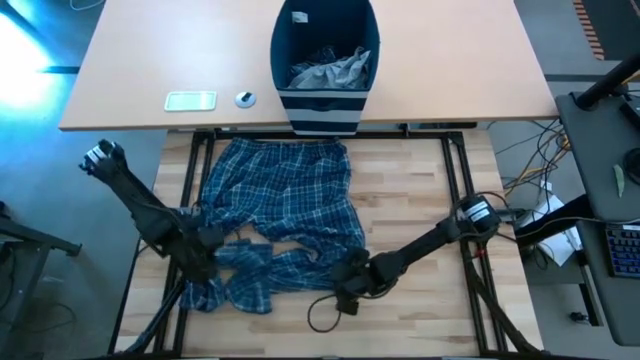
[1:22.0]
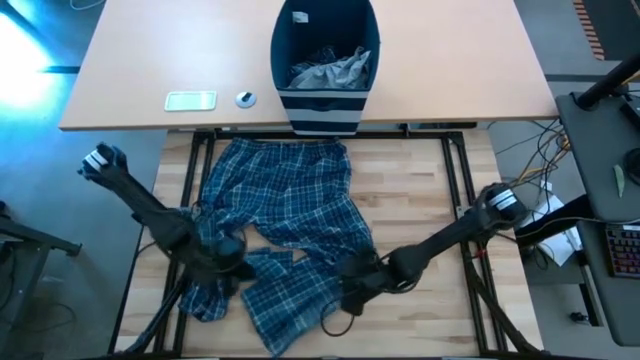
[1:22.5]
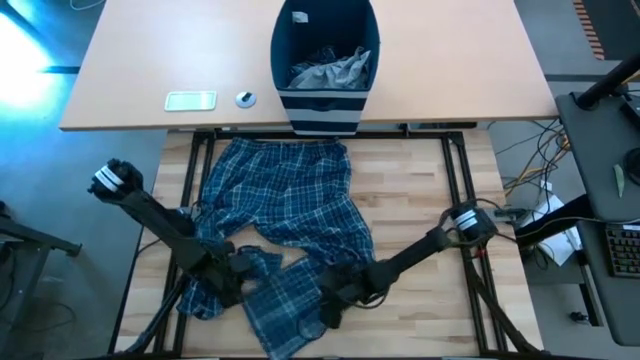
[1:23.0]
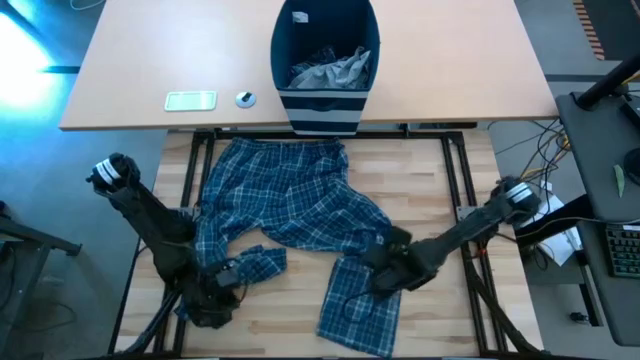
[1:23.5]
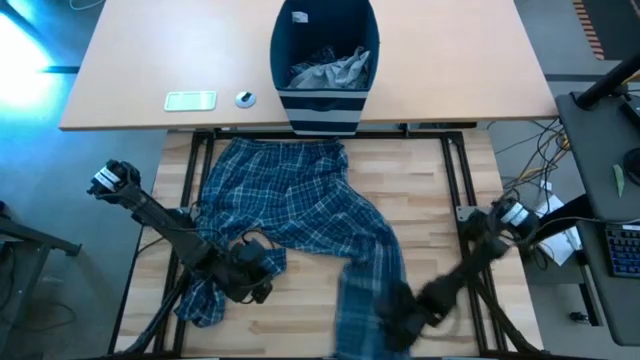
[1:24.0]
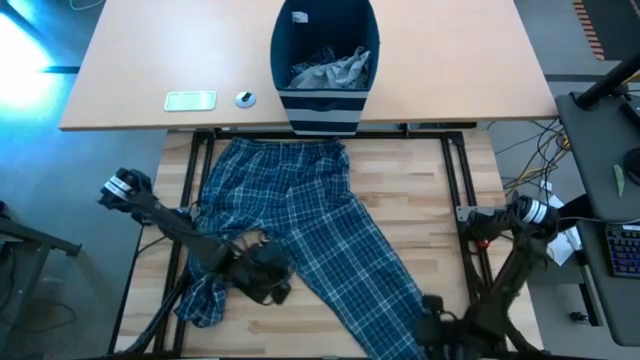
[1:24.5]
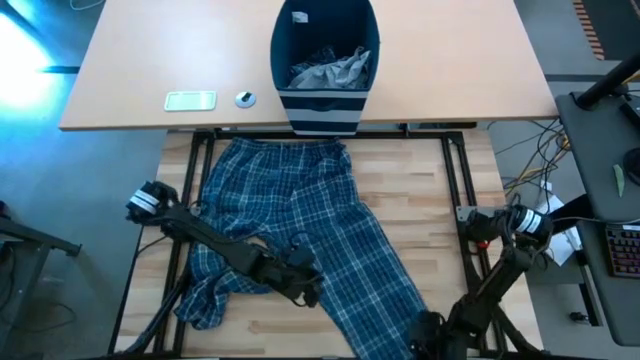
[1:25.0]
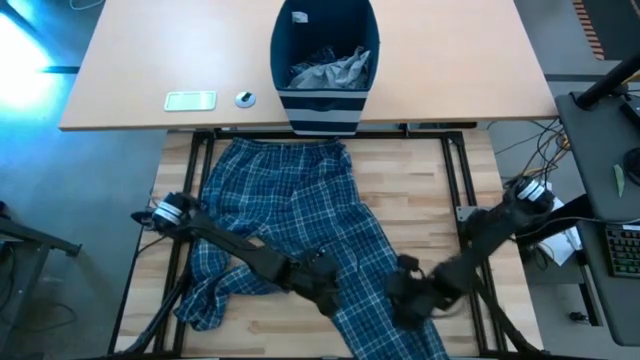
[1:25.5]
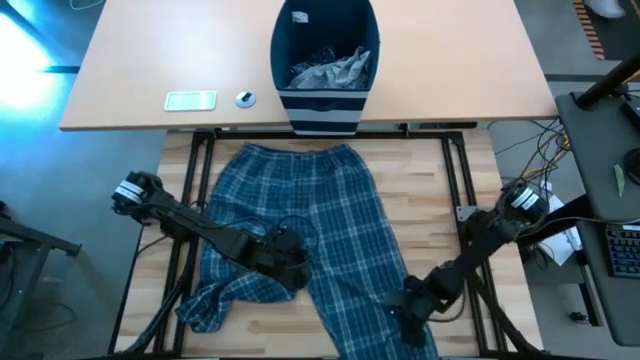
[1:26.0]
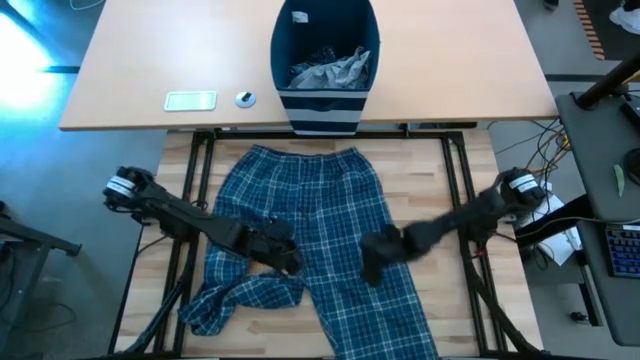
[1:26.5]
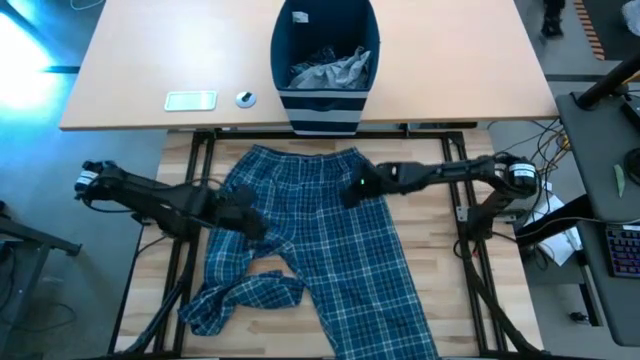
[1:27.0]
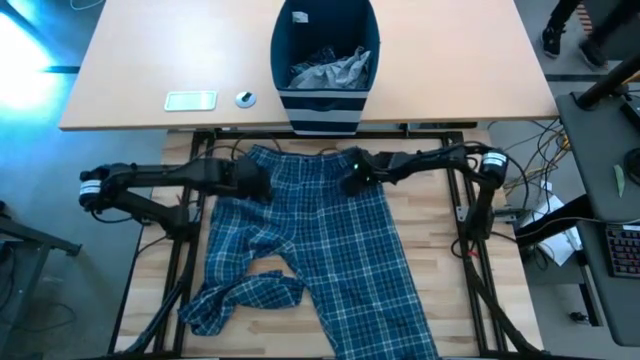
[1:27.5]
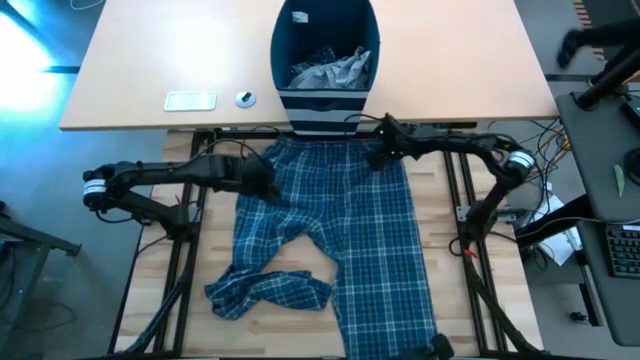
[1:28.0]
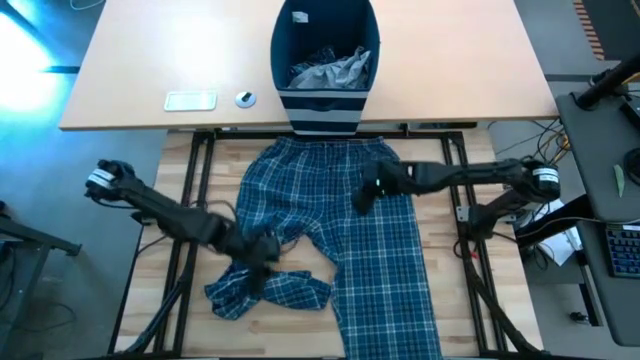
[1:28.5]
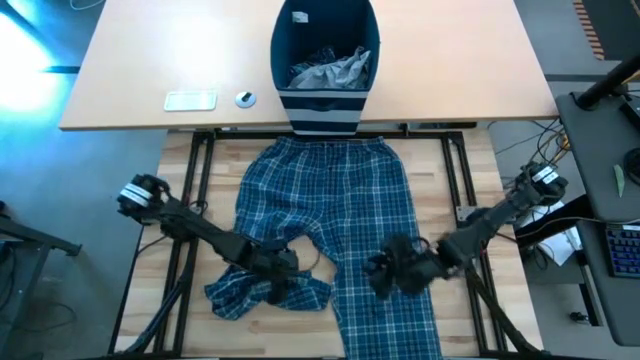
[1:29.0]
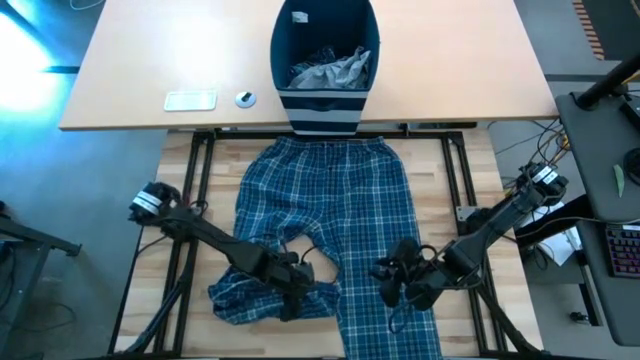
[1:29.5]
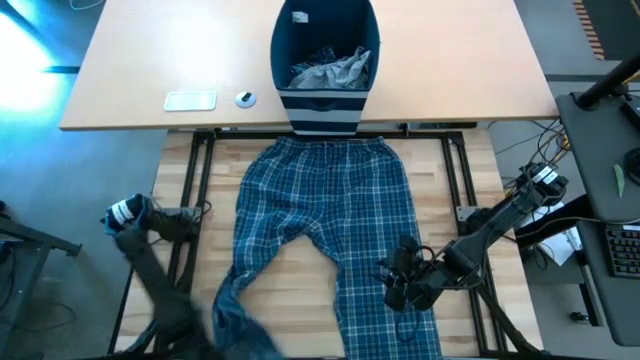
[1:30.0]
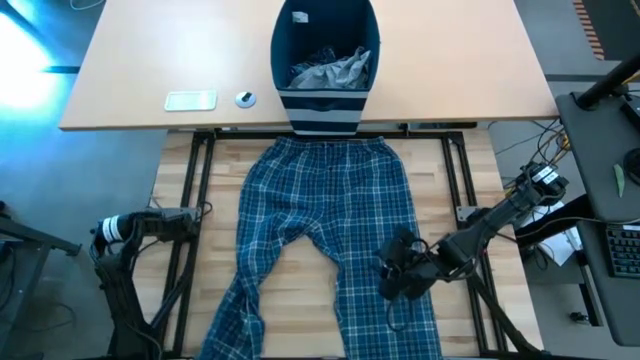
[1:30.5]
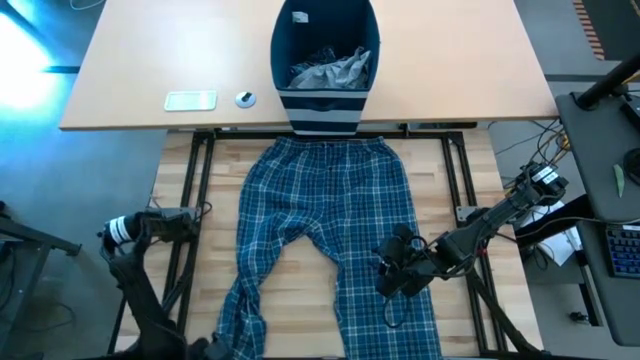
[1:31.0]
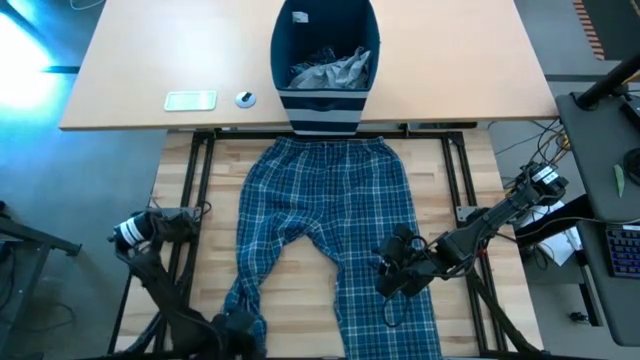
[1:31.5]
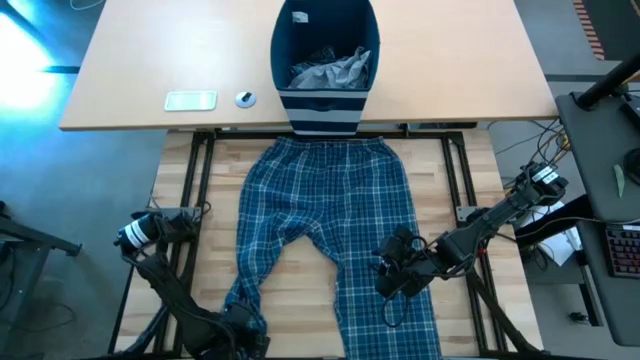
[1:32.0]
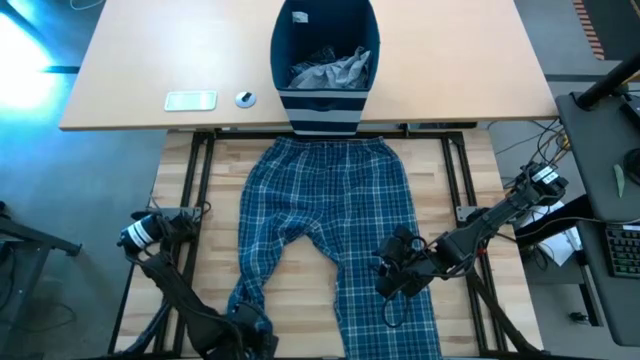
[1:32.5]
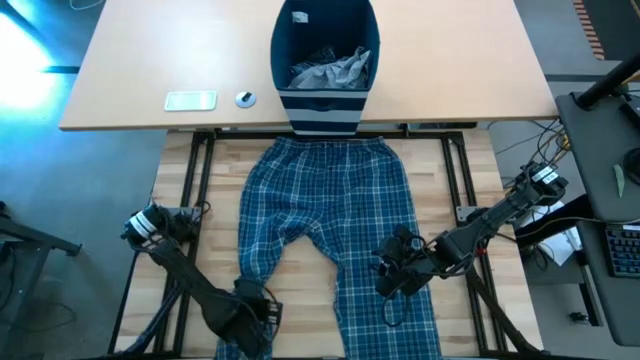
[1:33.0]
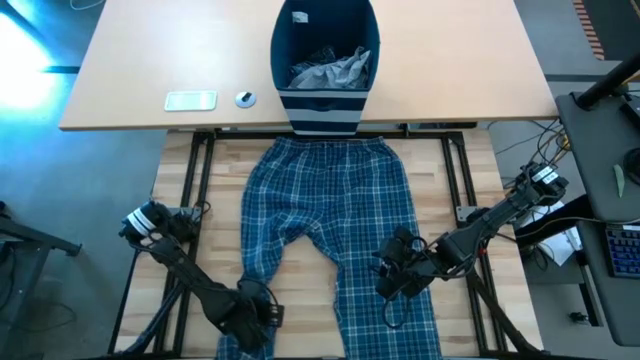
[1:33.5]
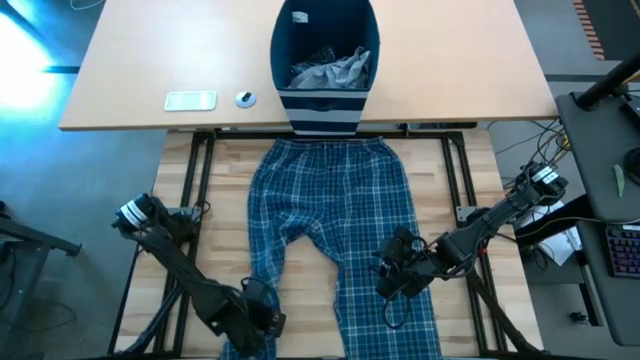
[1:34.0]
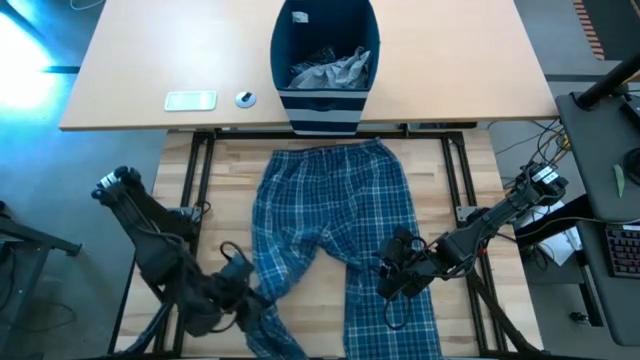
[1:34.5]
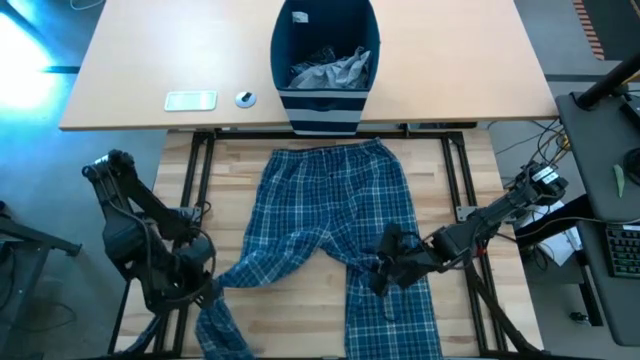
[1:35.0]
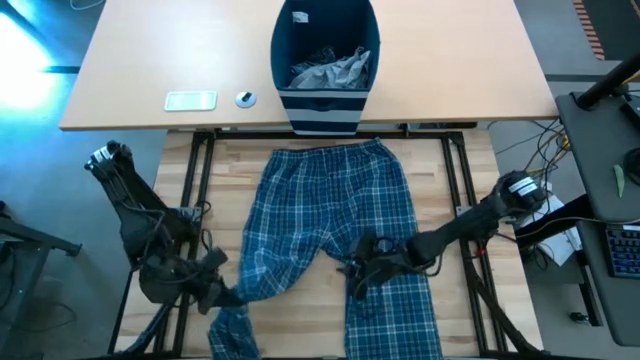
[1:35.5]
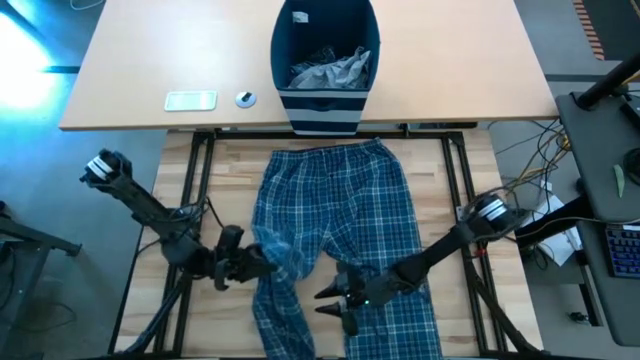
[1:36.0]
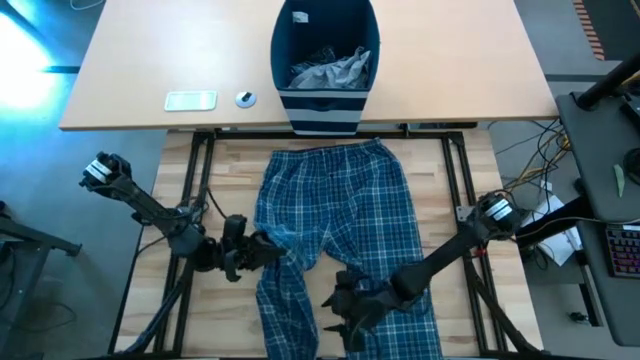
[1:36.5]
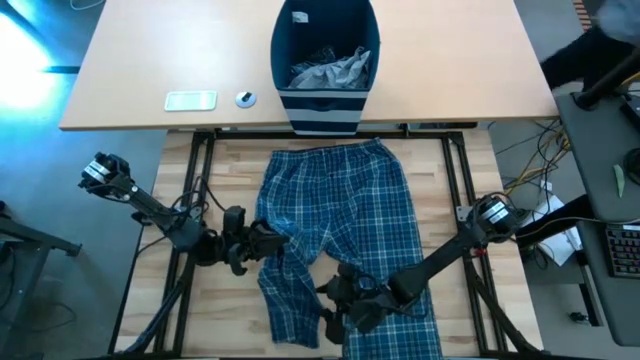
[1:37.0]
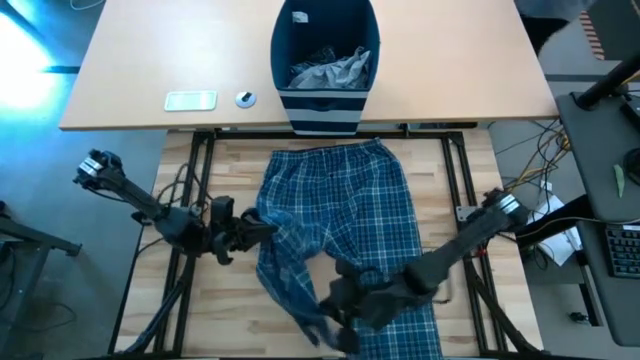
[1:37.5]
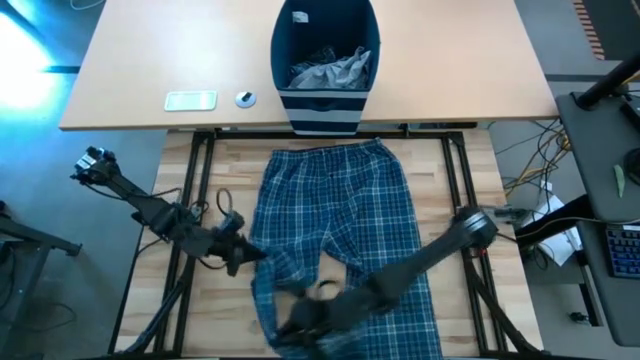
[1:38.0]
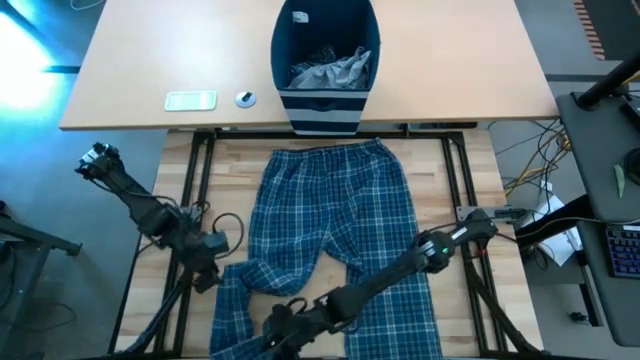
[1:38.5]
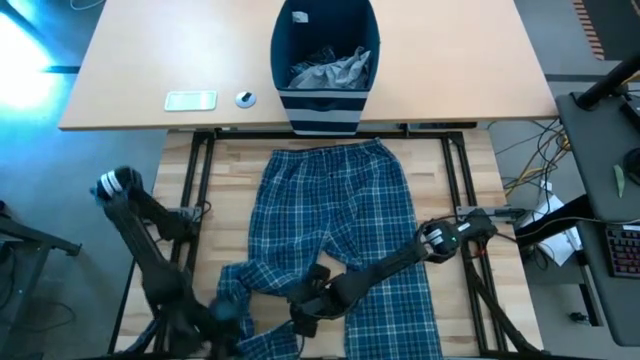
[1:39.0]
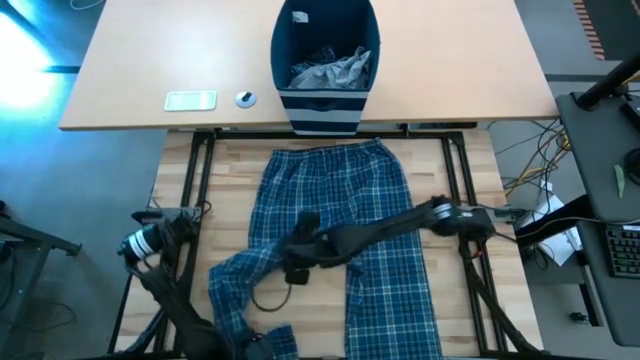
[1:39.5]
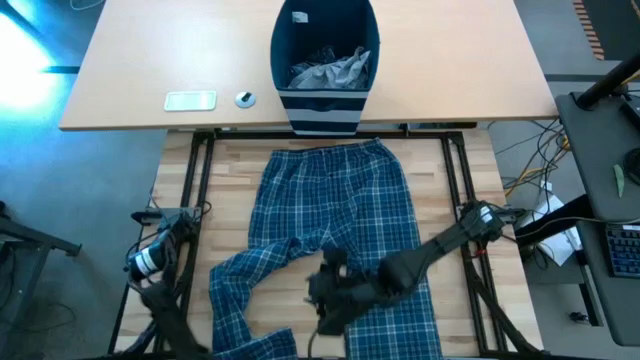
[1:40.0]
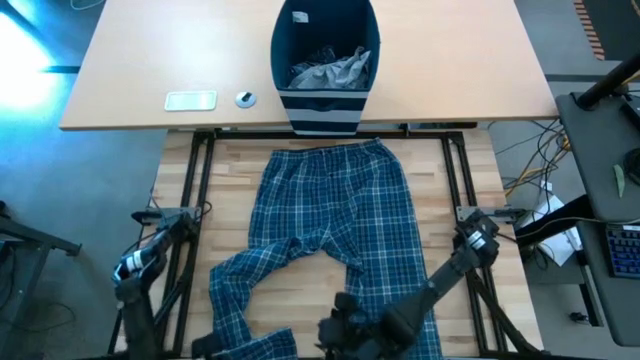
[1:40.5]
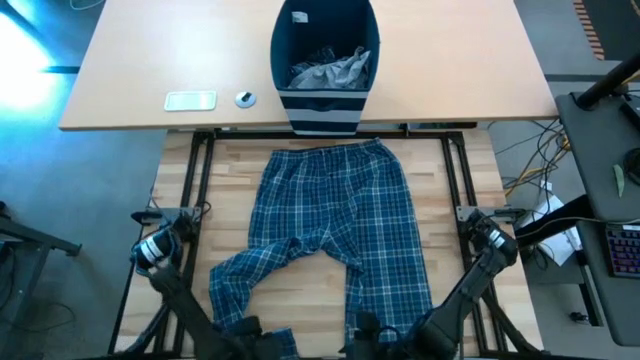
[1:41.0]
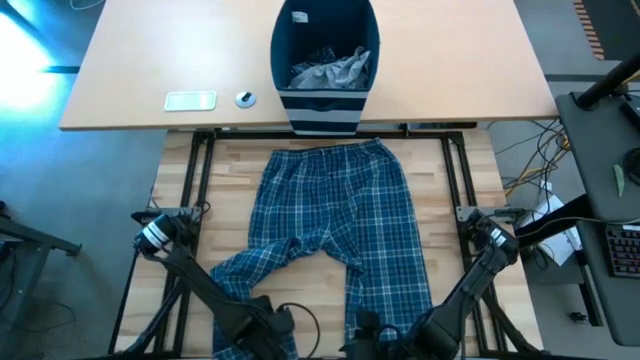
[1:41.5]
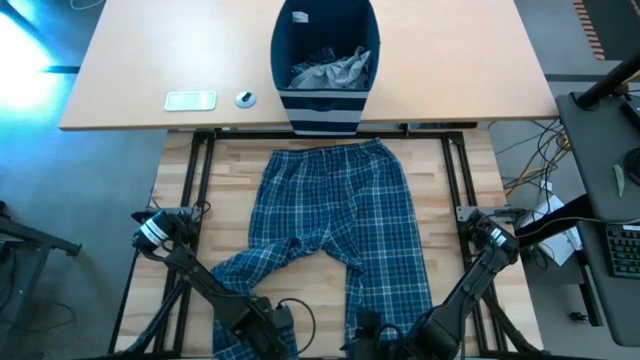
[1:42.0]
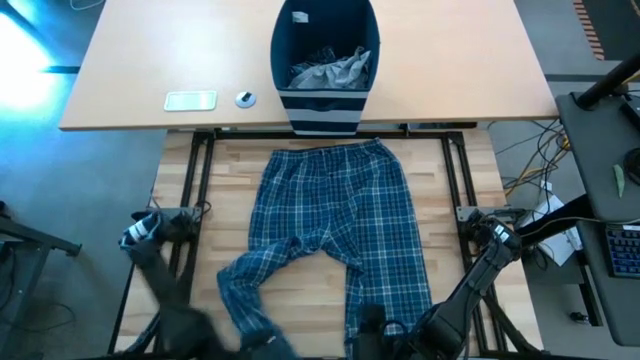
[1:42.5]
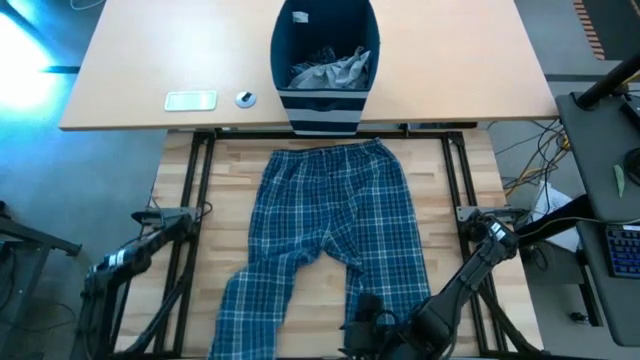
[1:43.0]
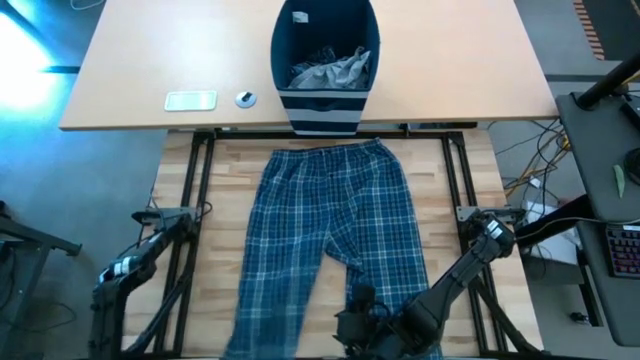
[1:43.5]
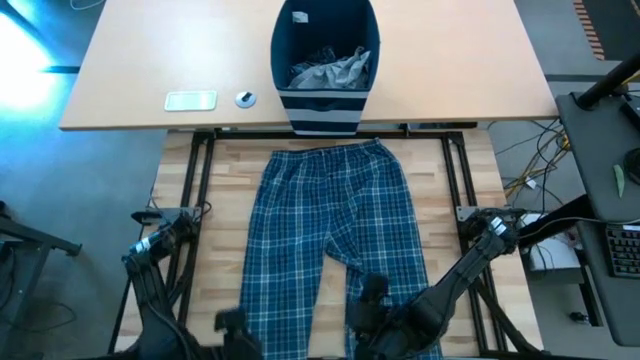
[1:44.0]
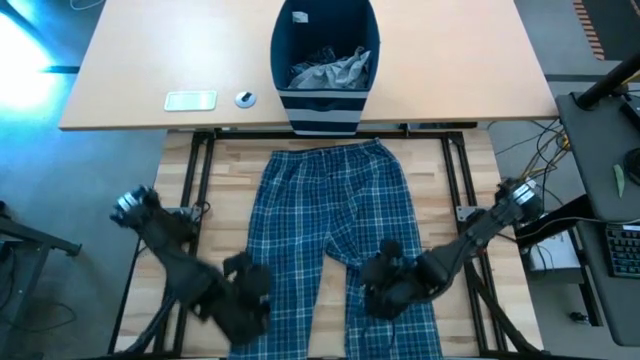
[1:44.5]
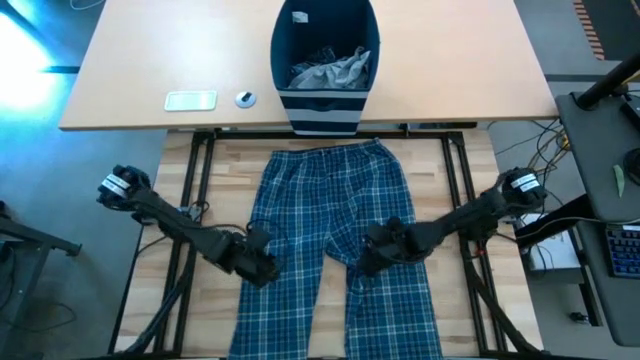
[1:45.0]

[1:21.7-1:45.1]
Task: Fold Laundry from Bin
Fold the blue patterned pants
